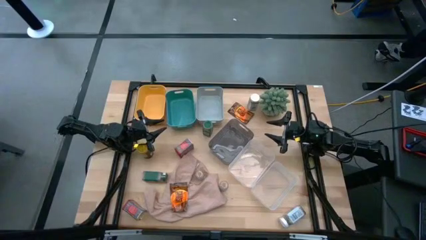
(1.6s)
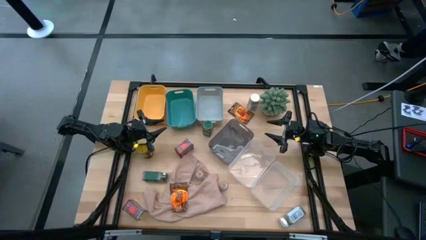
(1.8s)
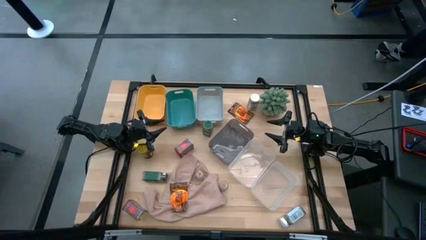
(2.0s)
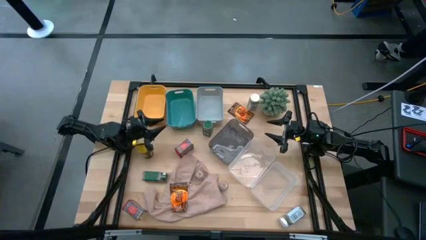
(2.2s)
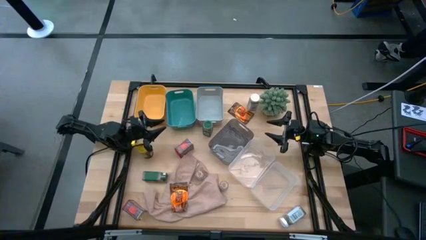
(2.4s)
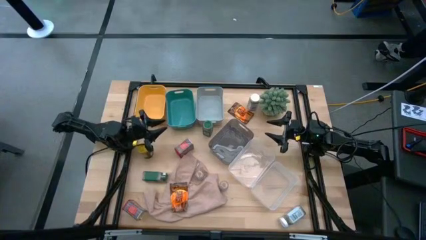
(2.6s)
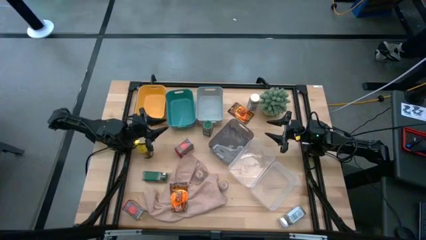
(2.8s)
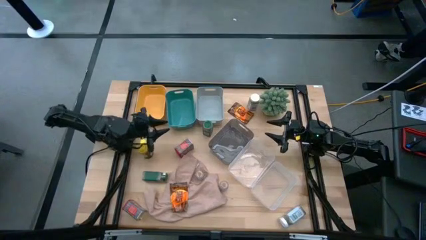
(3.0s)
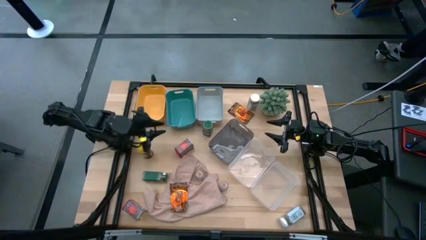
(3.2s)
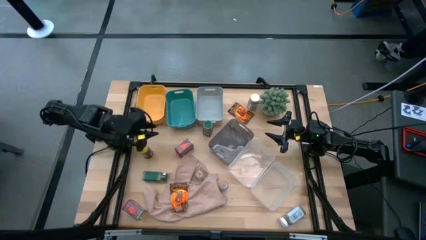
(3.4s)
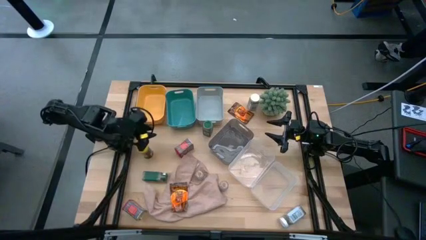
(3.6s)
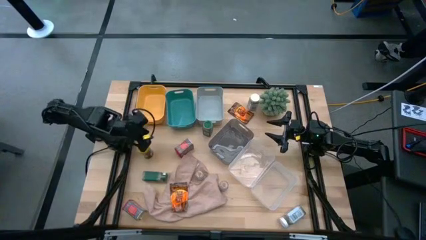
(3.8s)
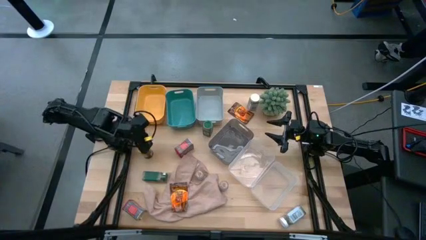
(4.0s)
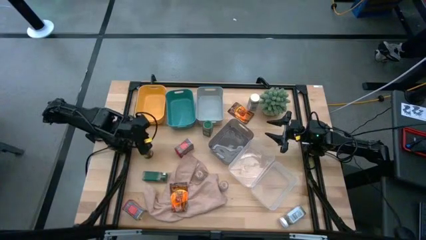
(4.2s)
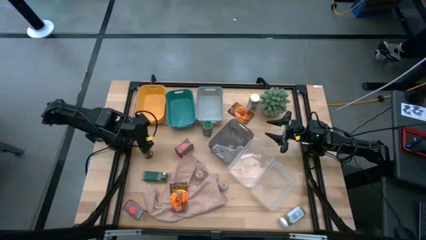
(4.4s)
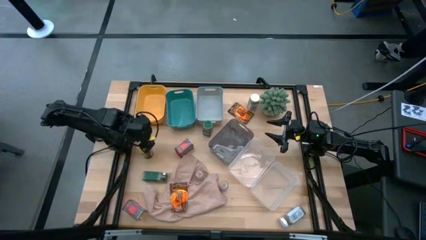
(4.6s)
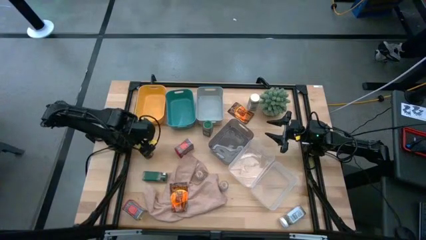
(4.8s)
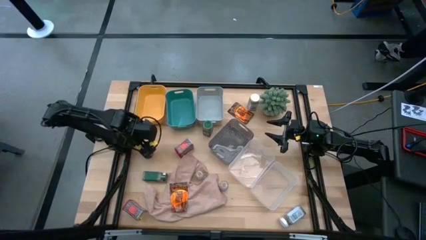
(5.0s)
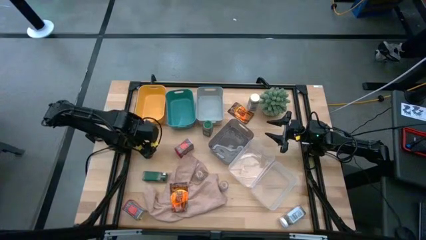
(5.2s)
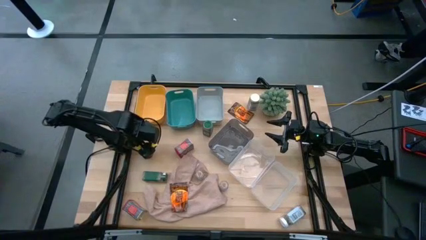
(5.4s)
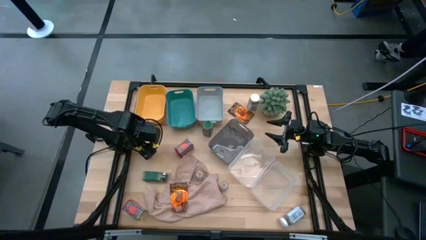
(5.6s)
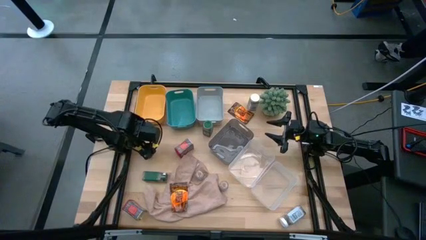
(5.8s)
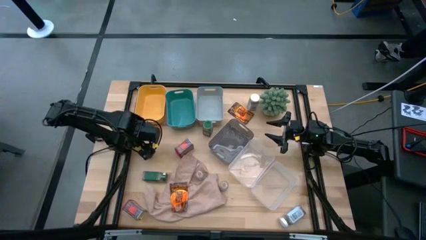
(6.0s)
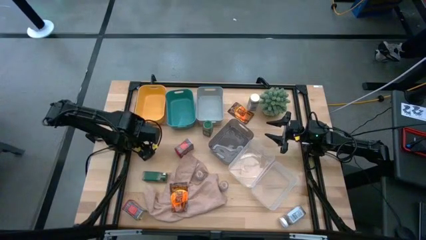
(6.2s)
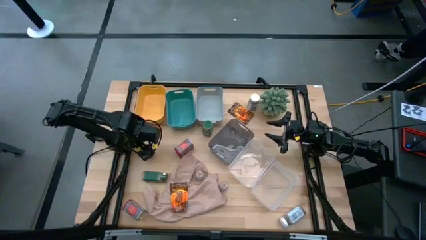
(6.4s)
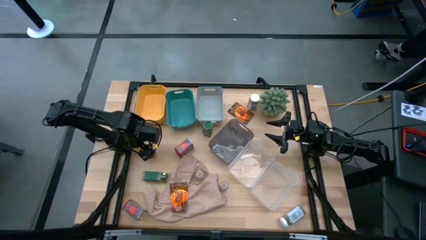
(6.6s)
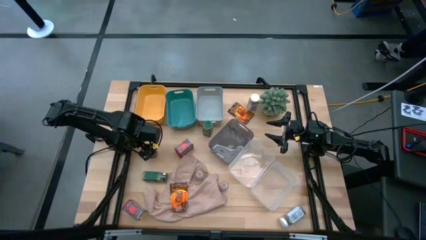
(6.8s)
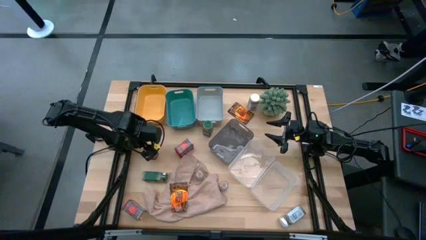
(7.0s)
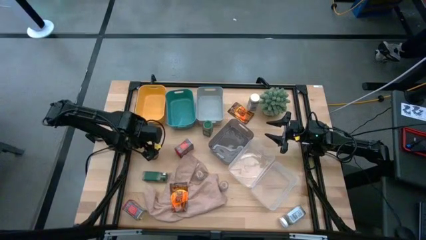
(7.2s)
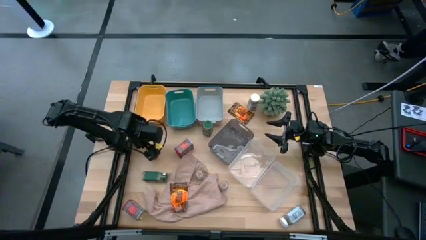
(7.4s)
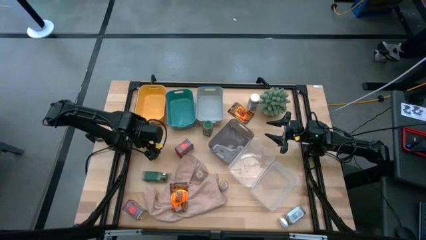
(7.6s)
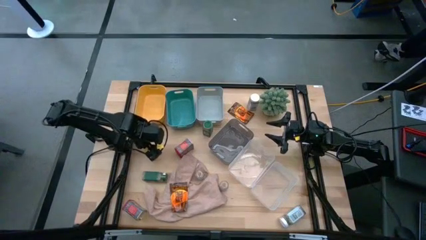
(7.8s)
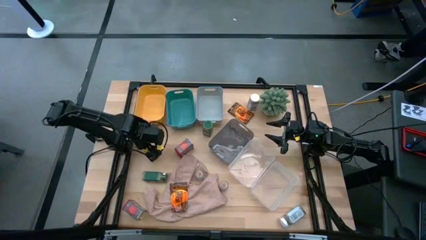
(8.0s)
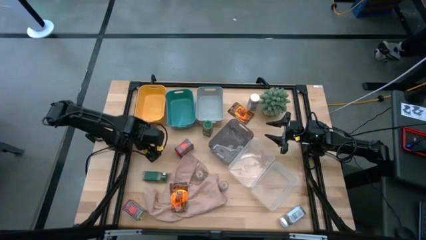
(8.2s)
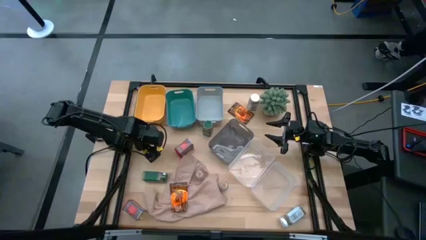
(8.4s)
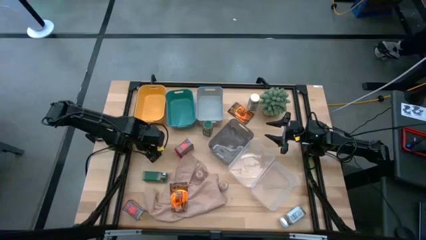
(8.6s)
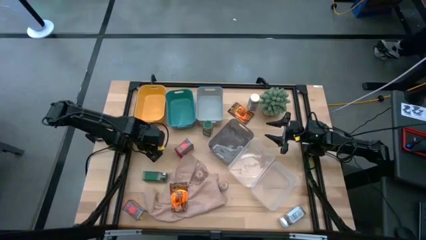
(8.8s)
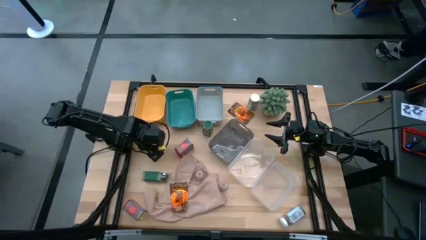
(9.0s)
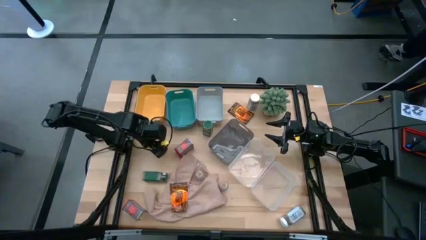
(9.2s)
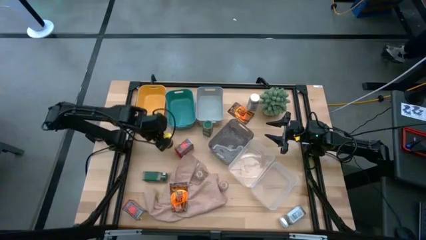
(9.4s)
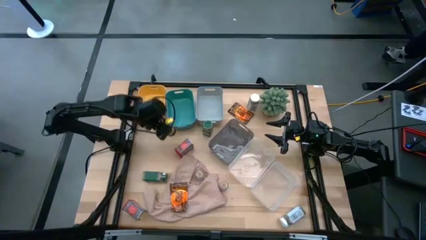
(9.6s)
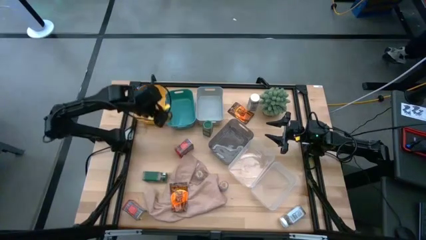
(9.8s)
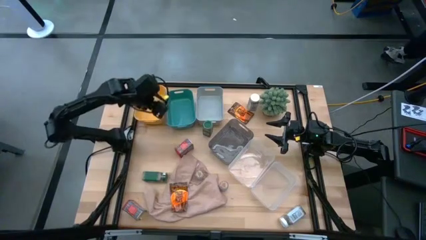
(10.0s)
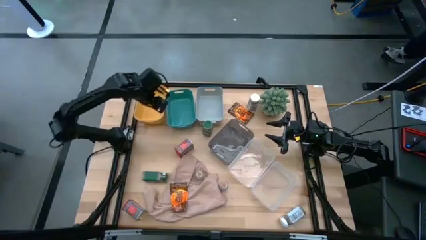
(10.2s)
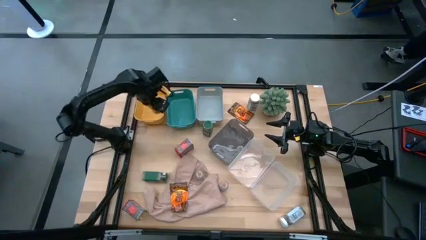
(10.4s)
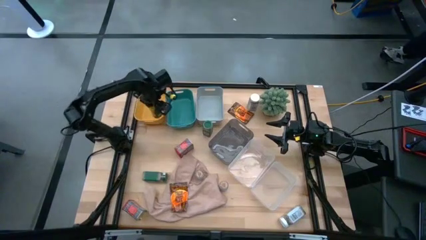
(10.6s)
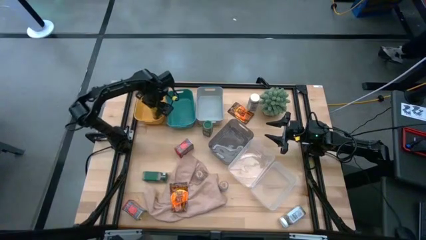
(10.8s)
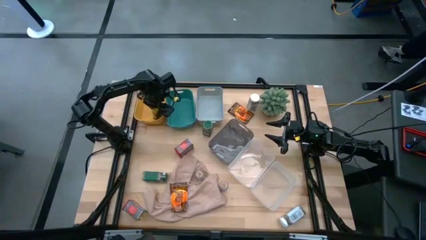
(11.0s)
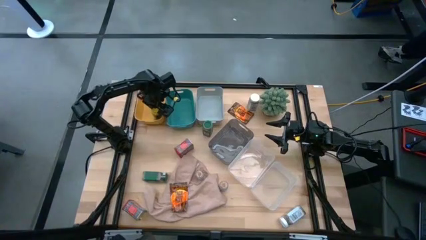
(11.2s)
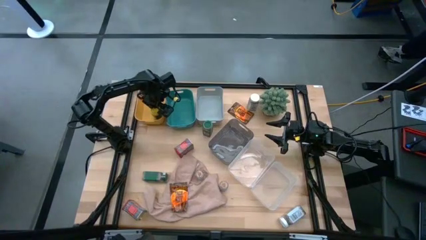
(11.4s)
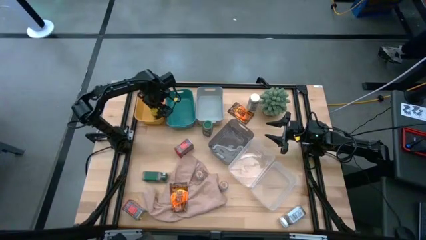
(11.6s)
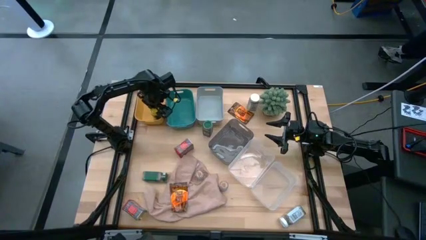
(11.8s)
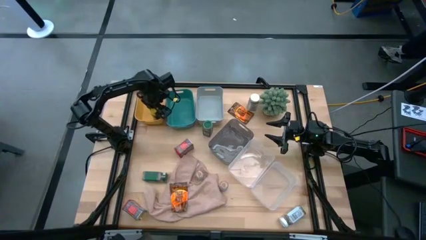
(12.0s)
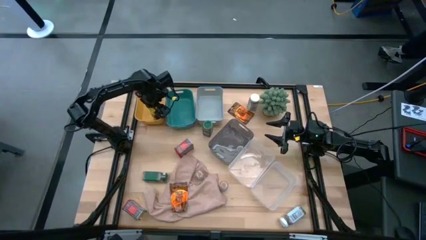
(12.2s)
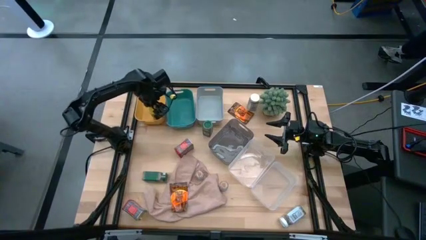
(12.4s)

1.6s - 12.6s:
Task: Sort spices by type
Put the yellow seasoning bottle into the yellow bin

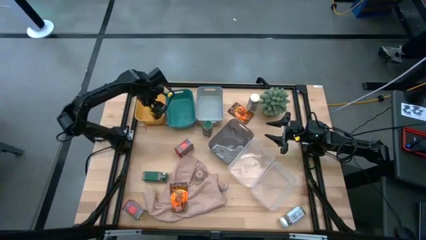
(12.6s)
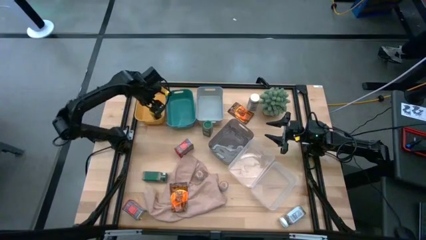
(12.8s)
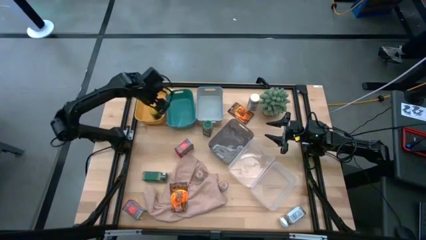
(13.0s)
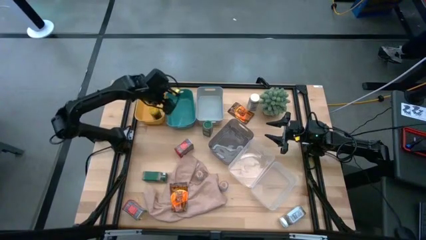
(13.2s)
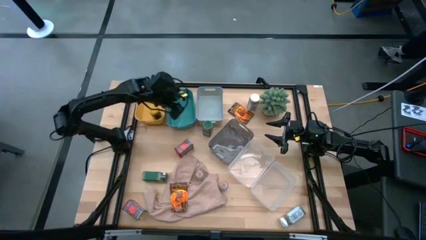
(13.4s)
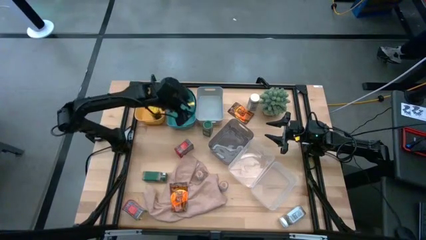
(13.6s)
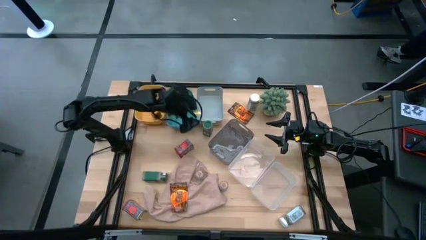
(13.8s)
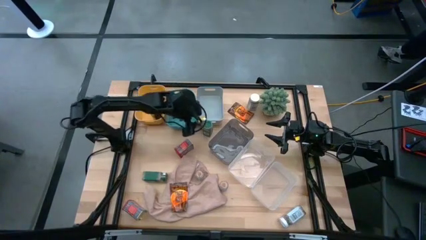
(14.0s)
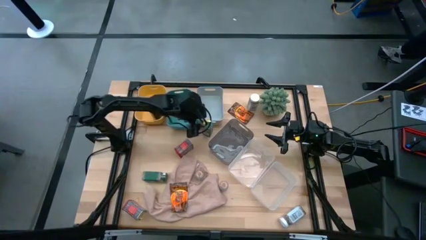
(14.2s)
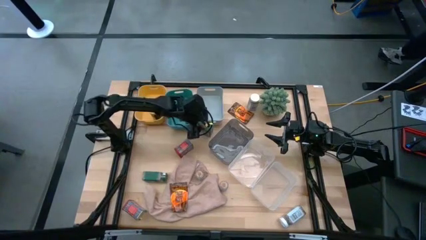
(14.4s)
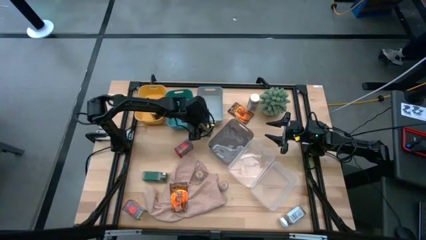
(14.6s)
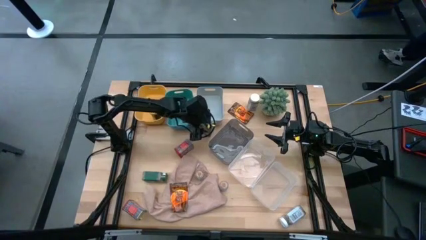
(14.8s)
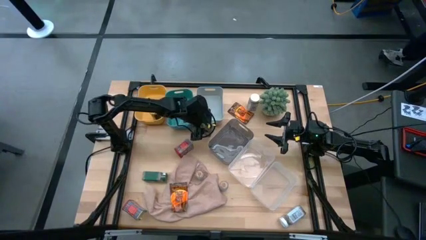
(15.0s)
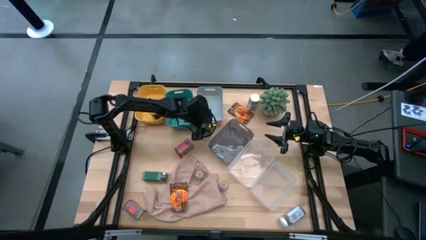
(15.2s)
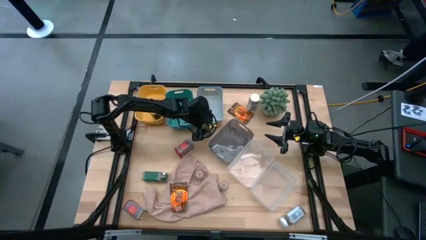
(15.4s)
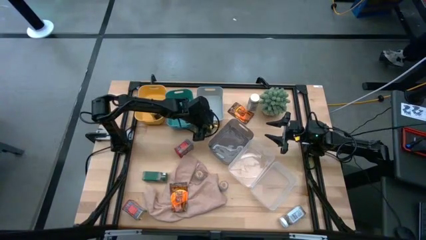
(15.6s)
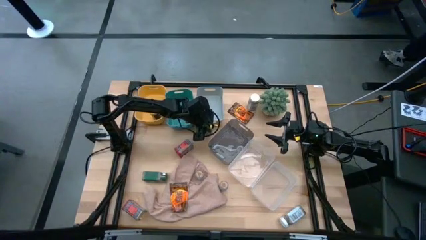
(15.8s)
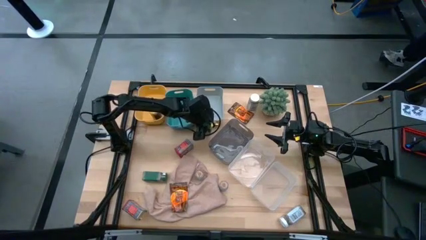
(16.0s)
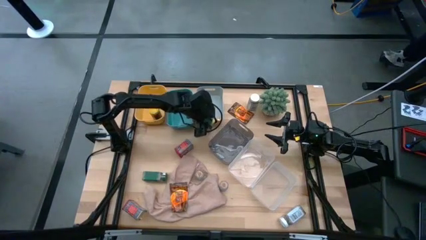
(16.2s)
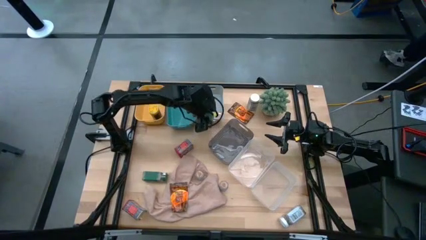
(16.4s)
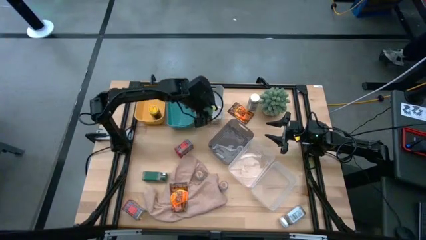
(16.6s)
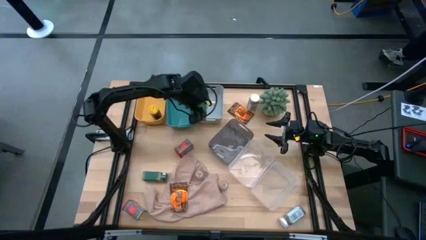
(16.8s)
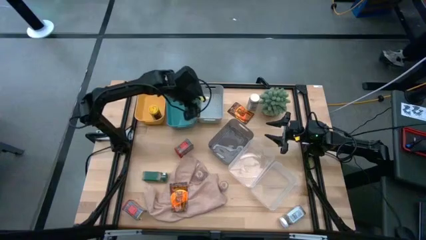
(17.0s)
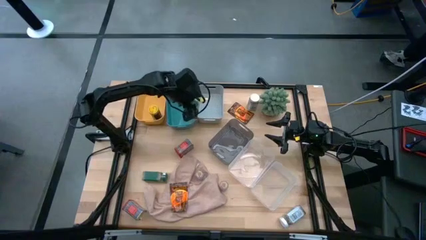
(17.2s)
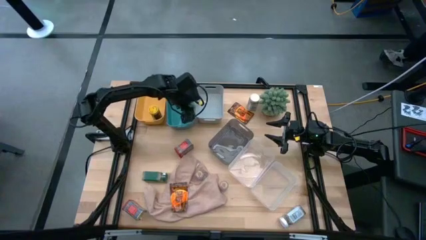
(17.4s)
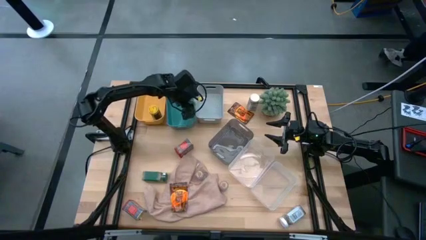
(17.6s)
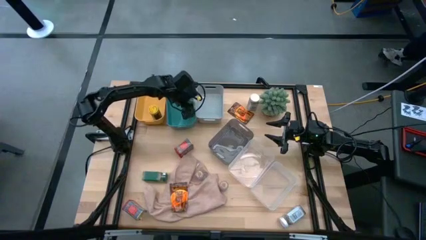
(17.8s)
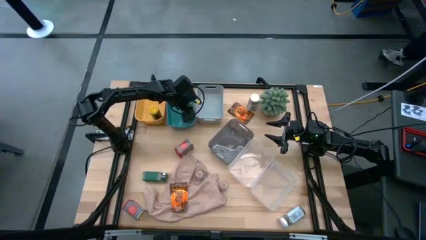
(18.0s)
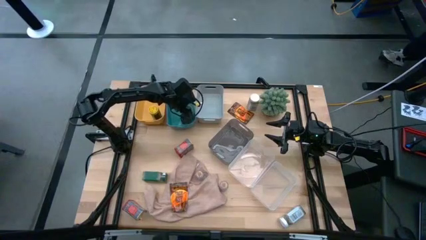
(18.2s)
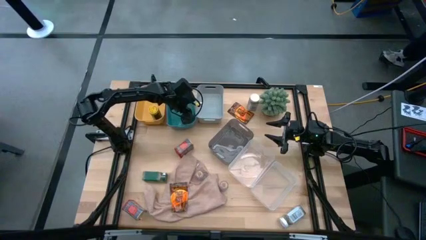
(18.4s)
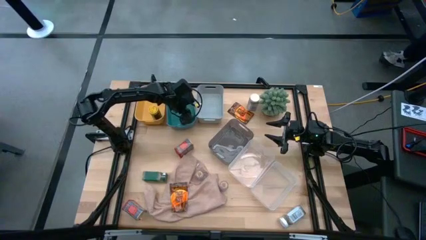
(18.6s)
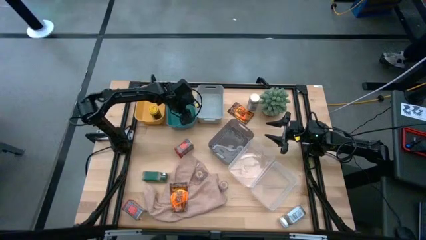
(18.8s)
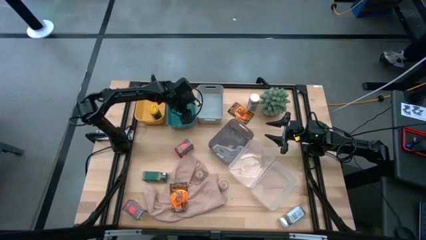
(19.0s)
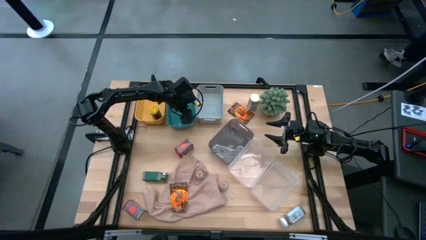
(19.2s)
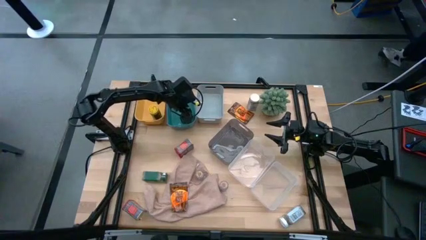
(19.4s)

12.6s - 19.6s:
Put the top green seasoning bottle into the green bin
